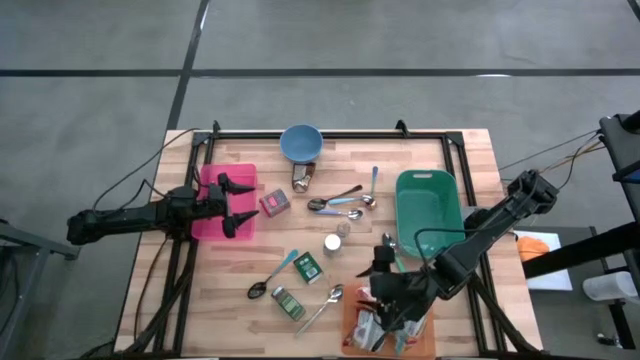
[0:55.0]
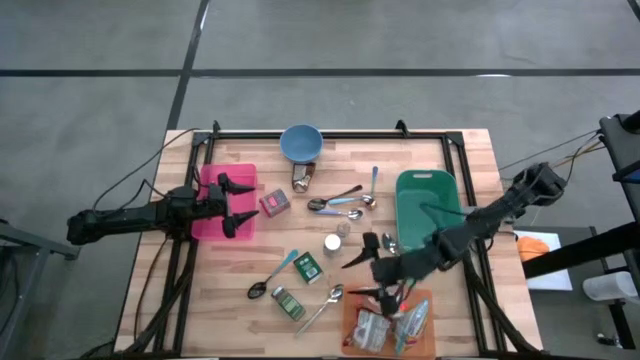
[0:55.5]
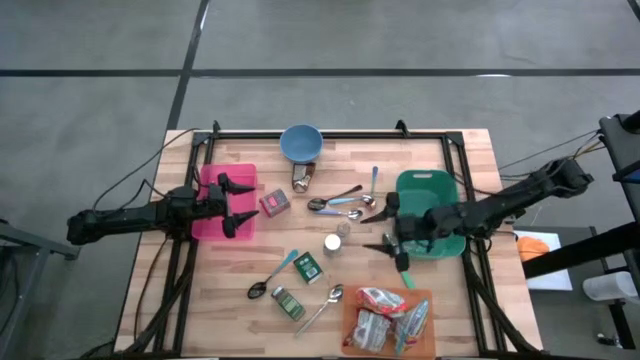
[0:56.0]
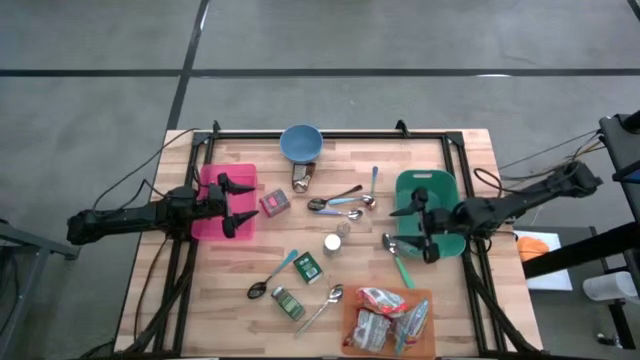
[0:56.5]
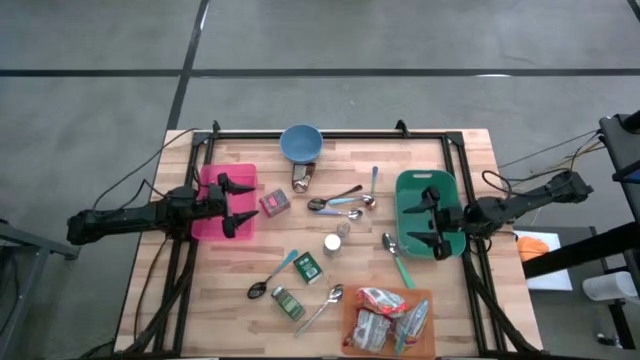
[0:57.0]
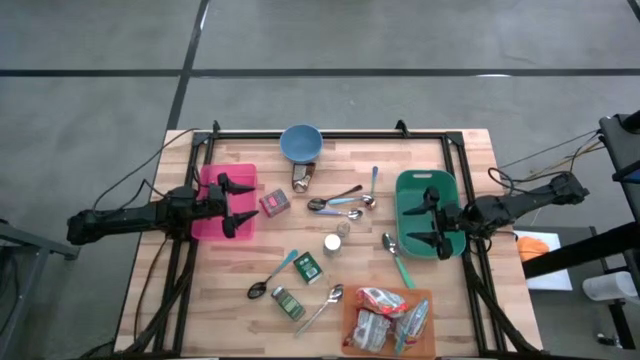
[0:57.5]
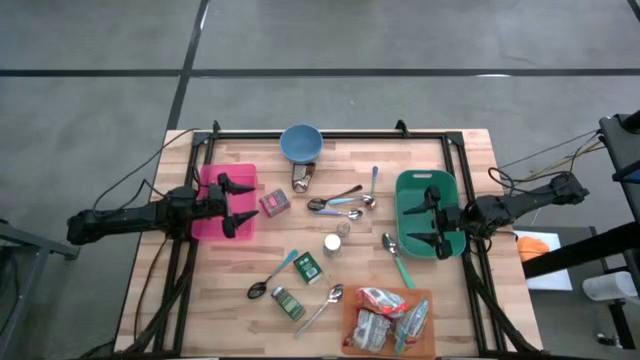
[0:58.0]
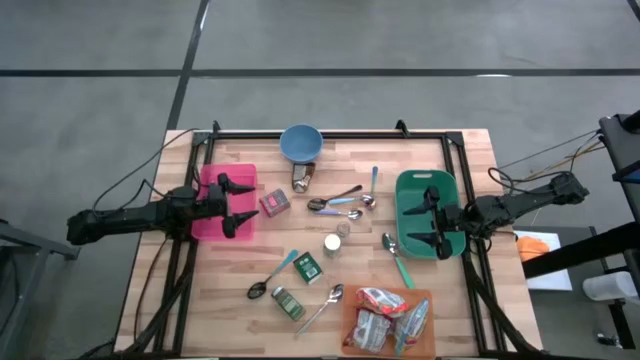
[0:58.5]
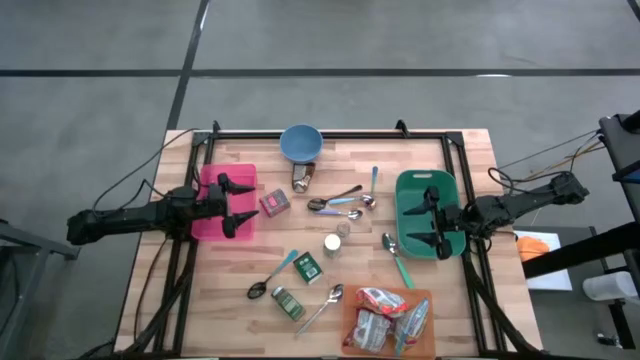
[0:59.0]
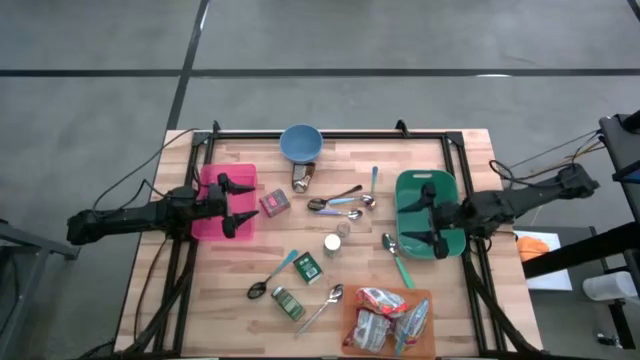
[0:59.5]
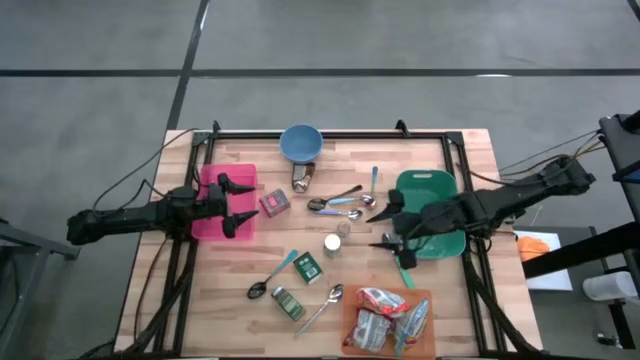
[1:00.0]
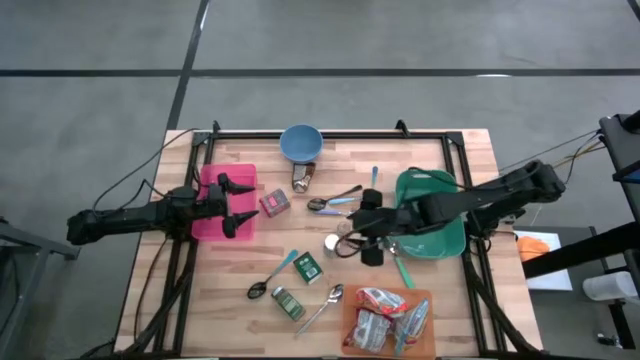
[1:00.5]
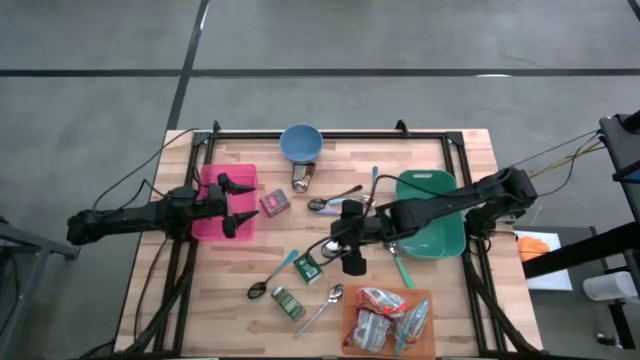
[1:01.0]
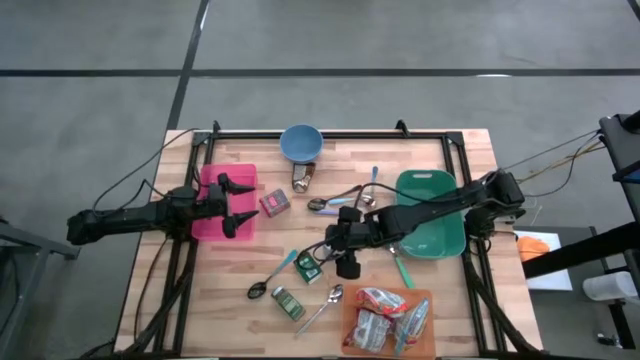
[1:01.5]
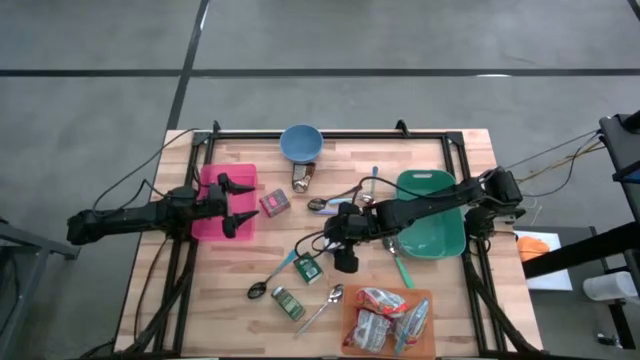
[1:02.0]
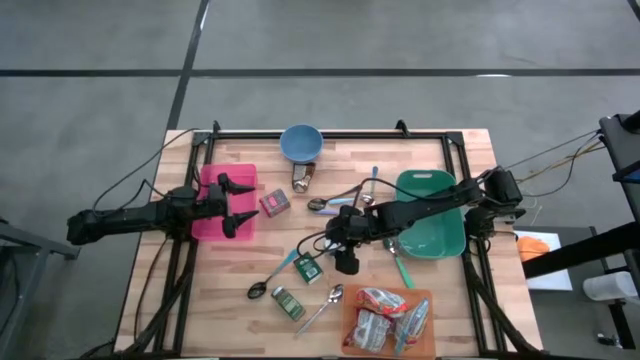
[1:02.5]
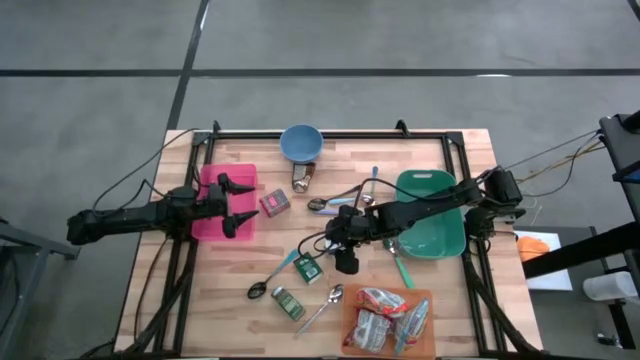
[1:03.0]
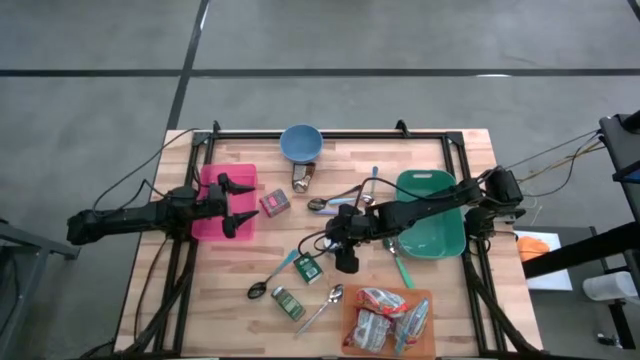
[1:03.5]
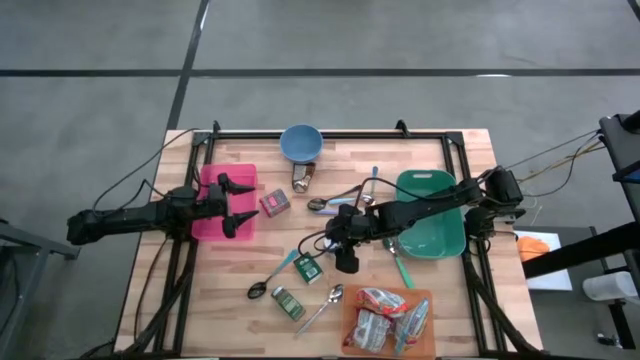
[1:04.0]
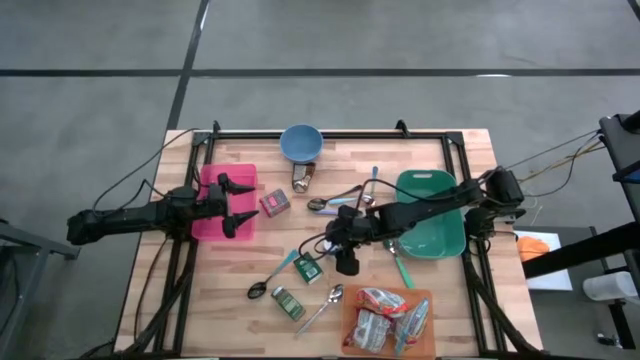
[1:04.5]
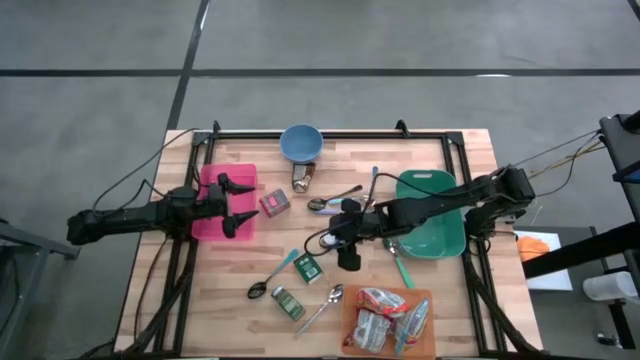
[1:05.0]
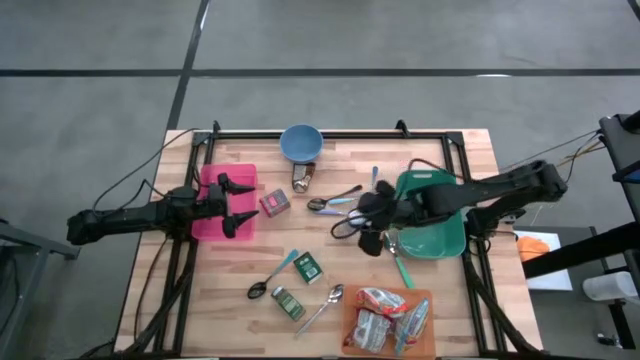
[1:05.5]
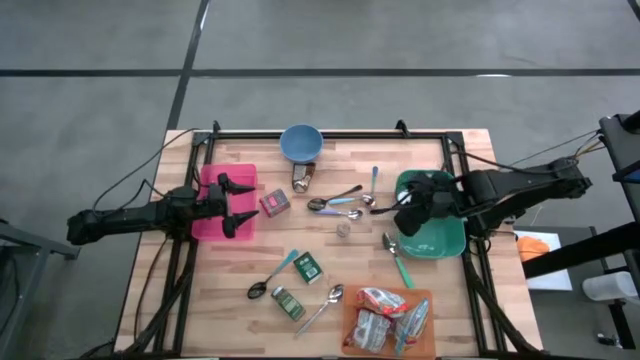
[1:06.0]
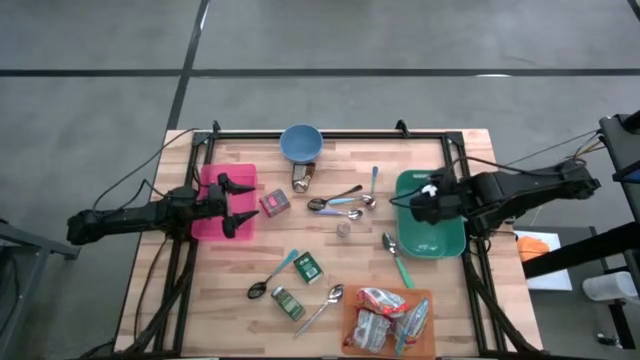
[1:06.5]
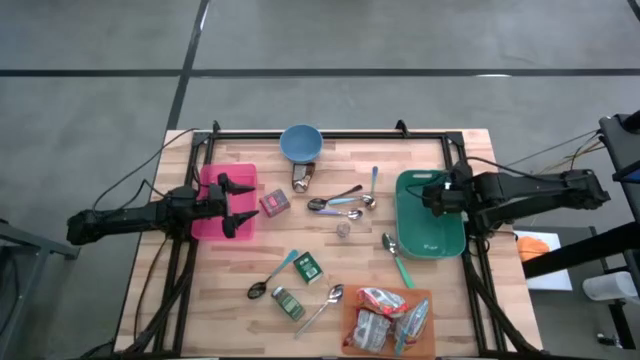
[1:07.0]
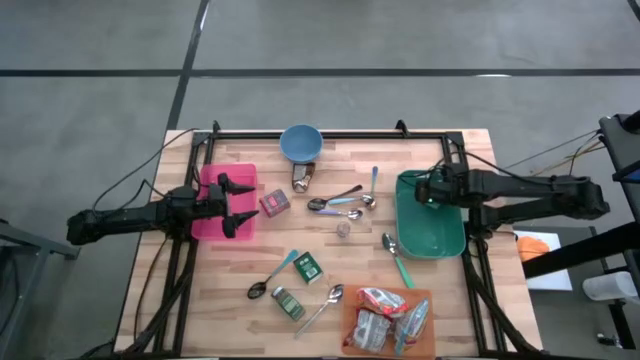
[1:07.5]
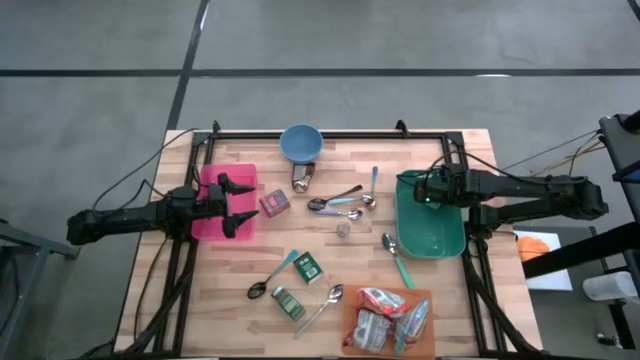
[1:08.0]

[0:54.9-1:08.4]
Put the white seasoning bottle into the green bin

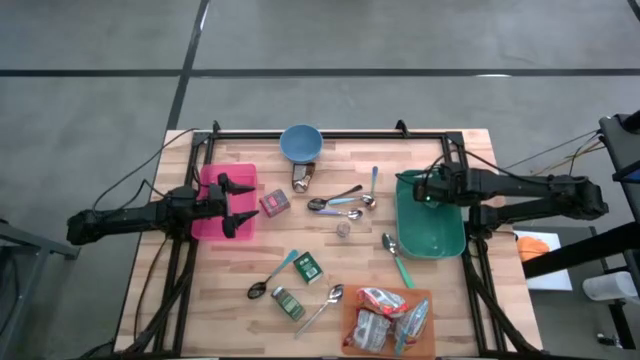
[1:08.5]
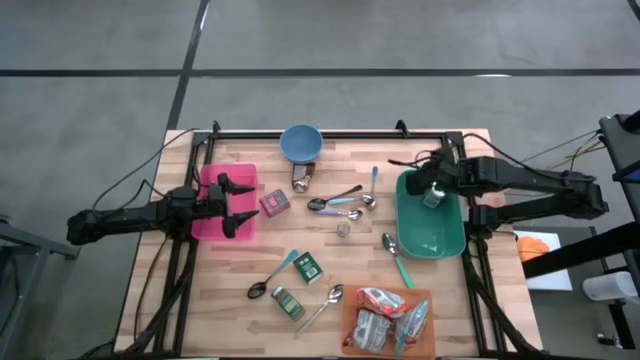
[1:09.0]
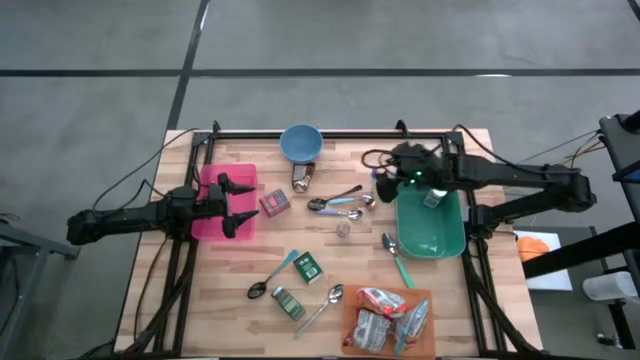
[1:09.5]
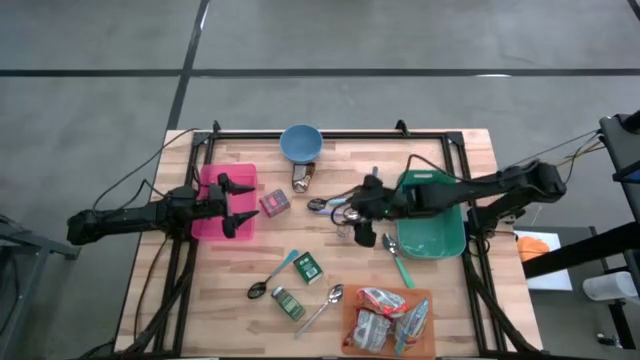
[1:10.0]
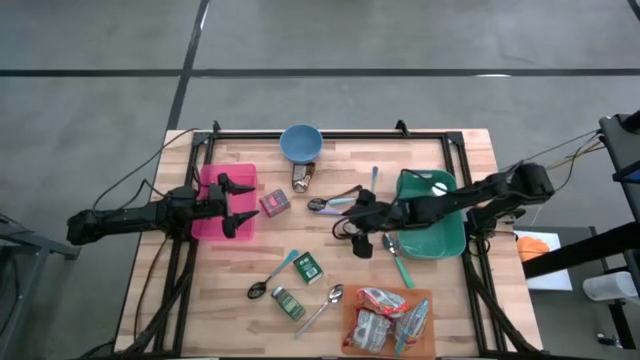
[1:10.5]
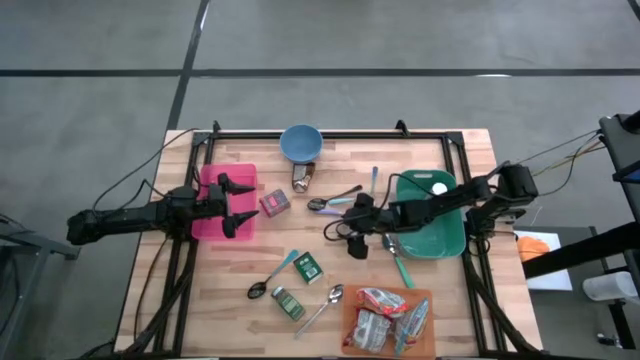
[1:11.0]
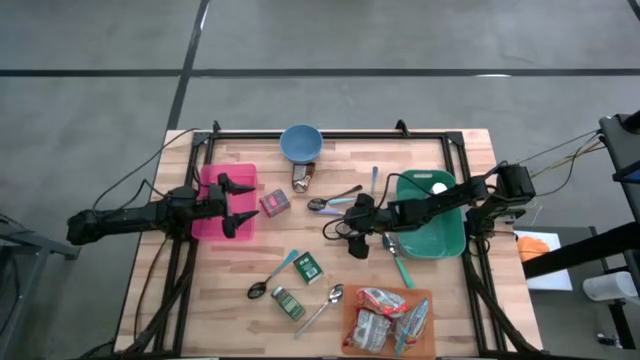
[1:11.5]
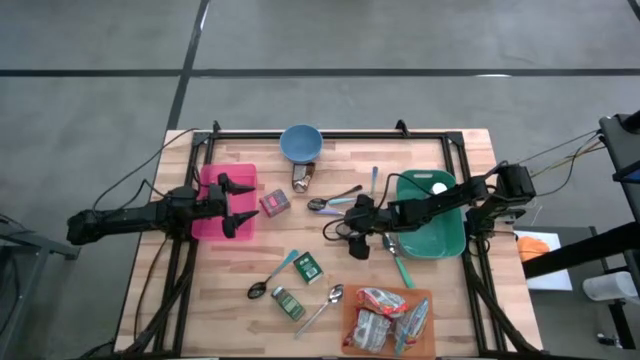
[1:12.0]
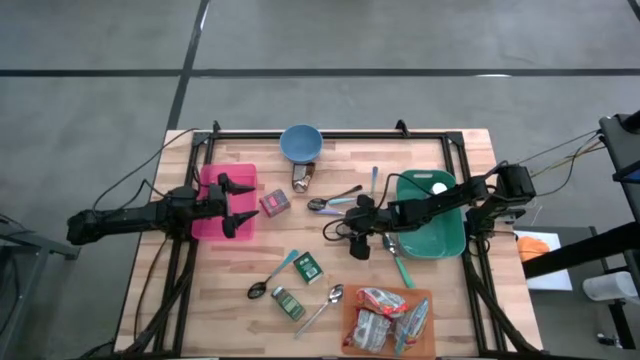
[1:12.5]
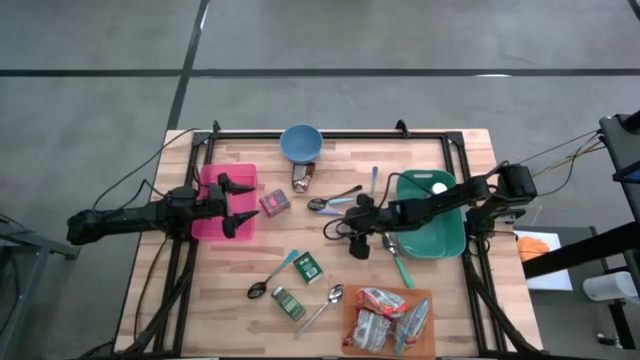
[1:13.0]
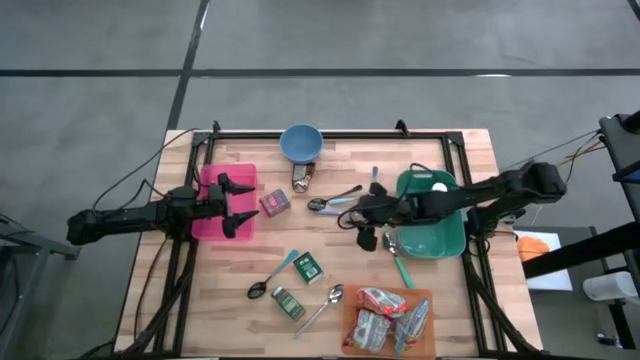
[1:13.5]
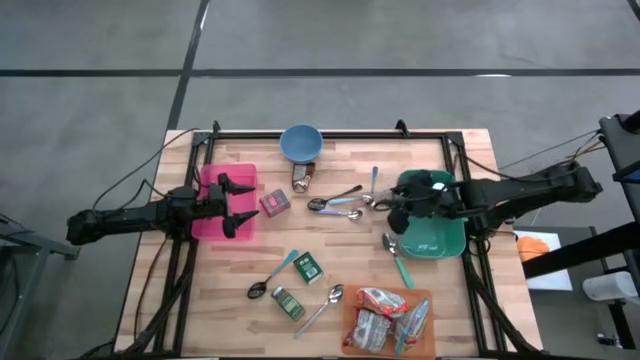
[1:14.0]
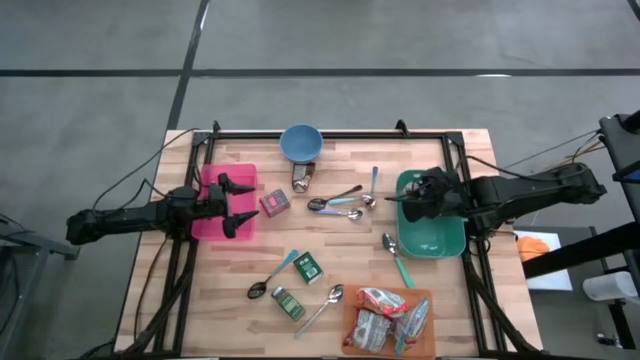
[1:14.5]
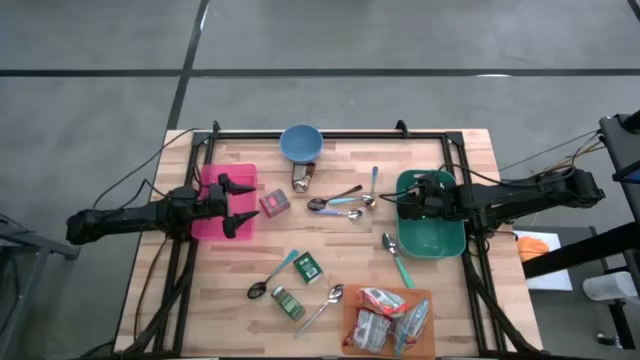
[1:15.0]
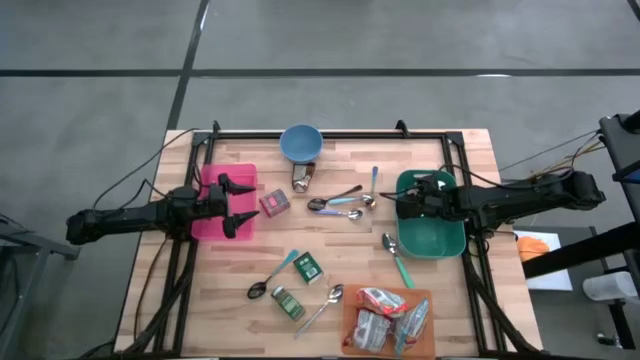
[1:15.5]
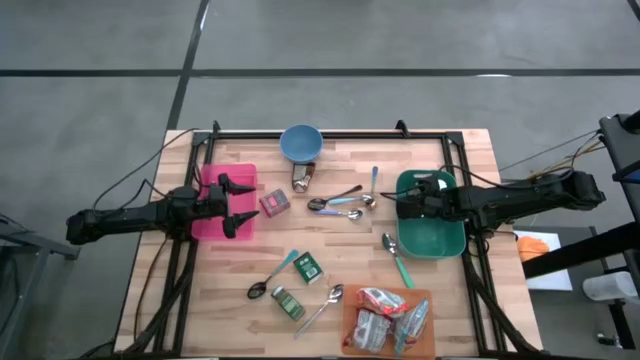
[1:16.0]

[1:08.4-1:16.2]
Put the brown seasoning bottle into the green bin
